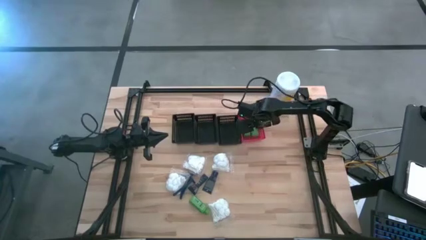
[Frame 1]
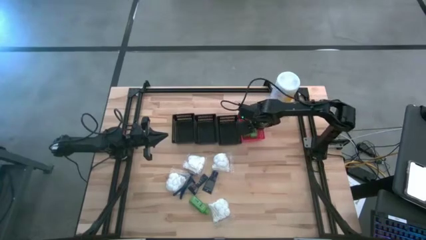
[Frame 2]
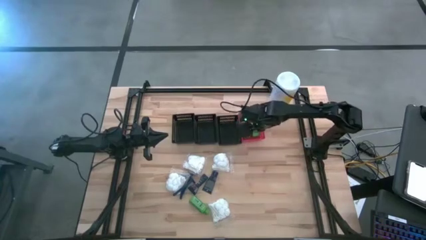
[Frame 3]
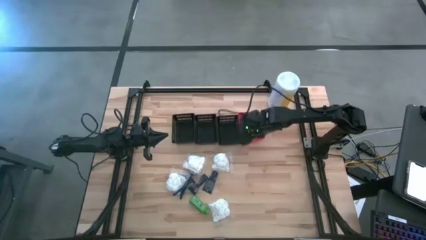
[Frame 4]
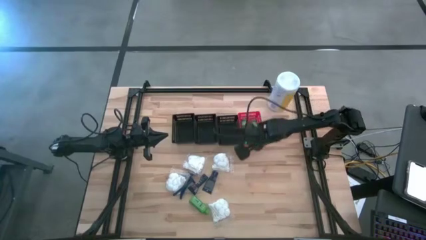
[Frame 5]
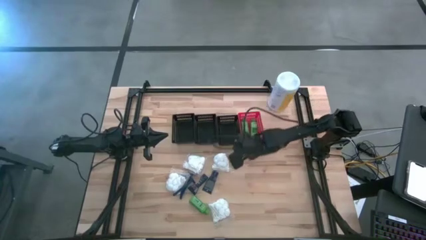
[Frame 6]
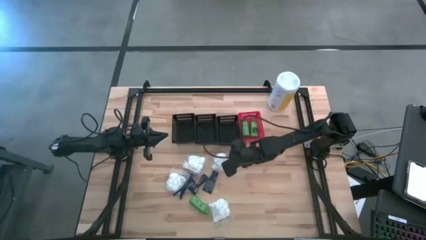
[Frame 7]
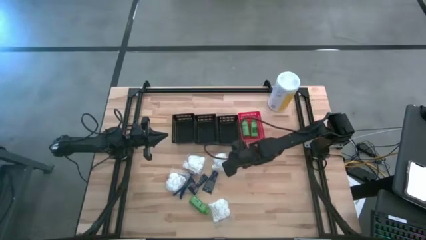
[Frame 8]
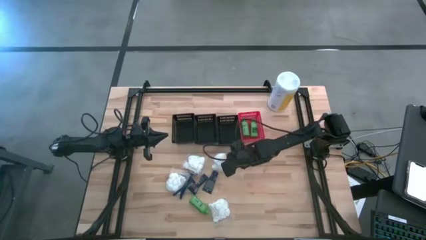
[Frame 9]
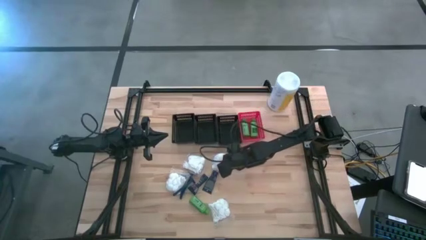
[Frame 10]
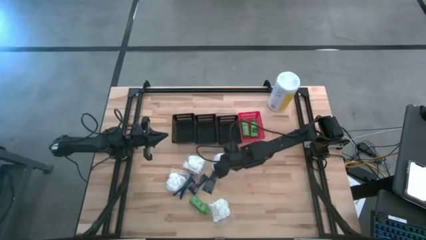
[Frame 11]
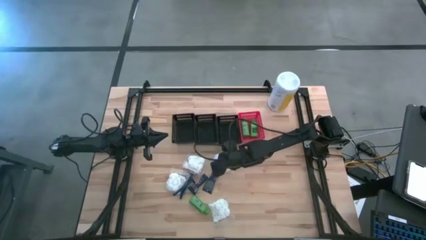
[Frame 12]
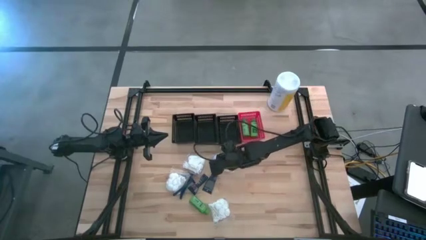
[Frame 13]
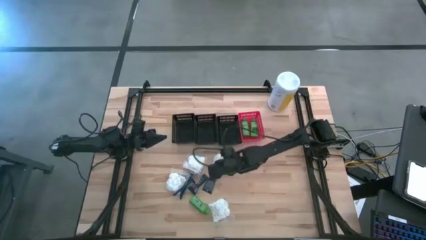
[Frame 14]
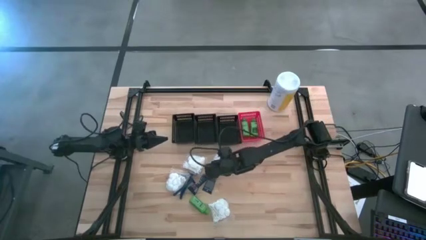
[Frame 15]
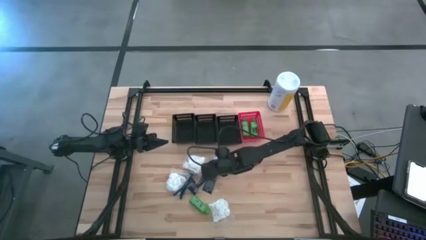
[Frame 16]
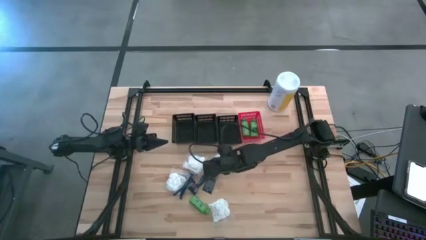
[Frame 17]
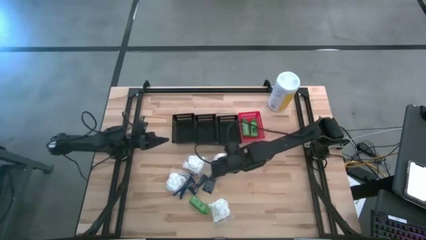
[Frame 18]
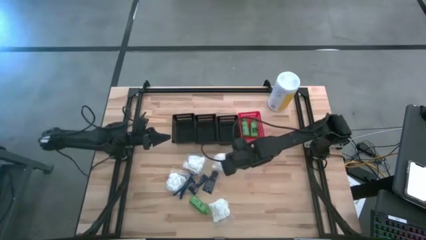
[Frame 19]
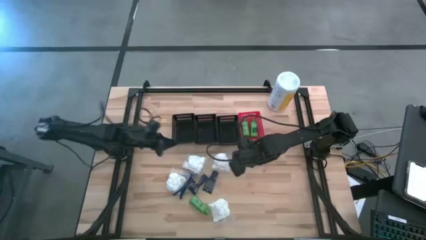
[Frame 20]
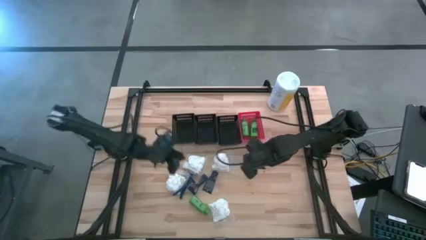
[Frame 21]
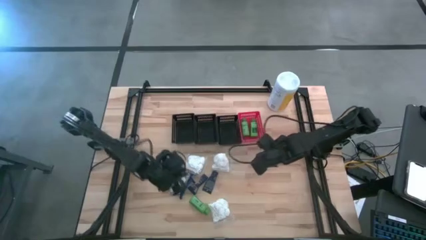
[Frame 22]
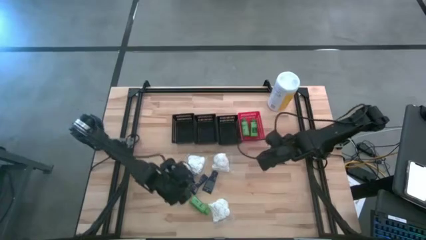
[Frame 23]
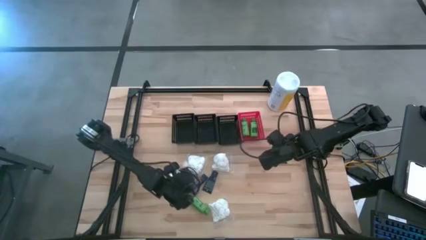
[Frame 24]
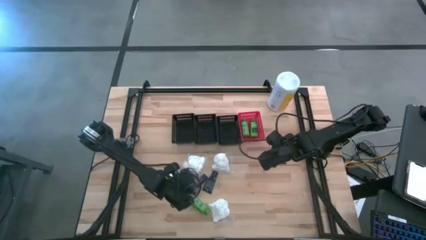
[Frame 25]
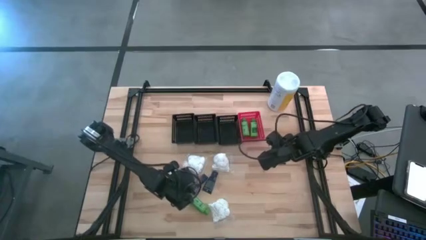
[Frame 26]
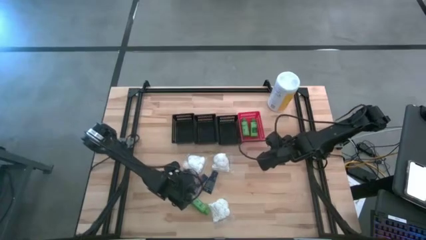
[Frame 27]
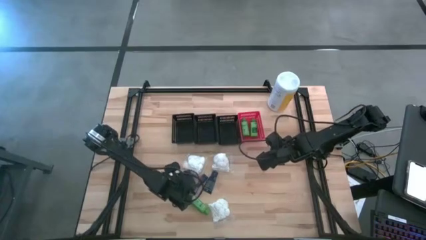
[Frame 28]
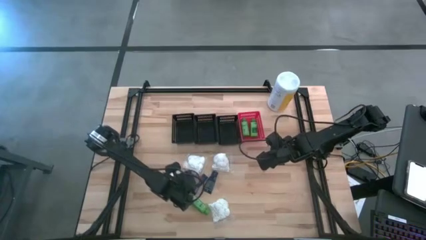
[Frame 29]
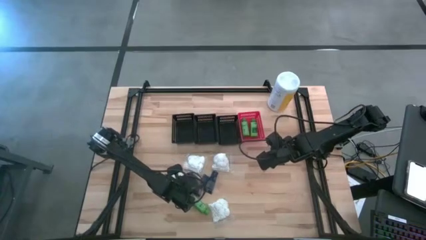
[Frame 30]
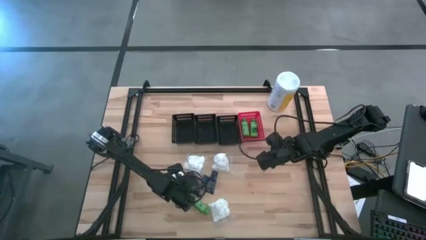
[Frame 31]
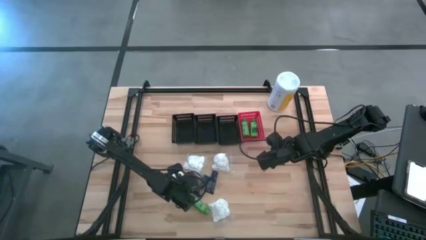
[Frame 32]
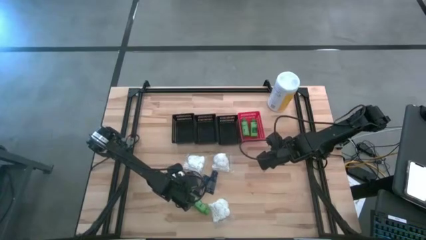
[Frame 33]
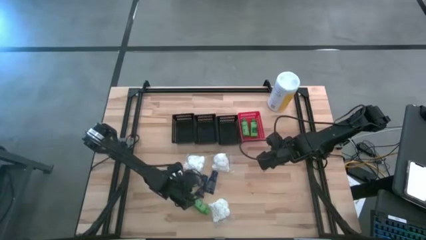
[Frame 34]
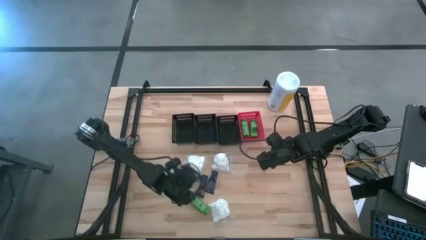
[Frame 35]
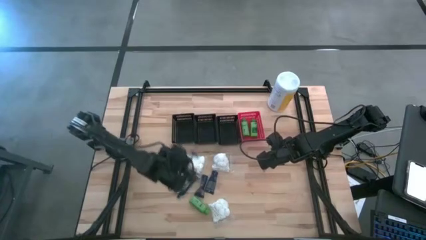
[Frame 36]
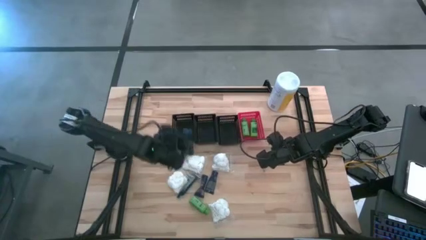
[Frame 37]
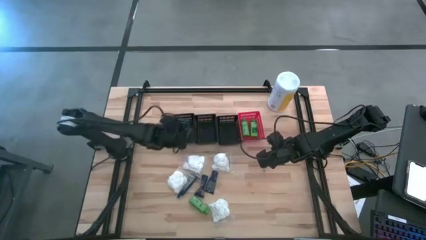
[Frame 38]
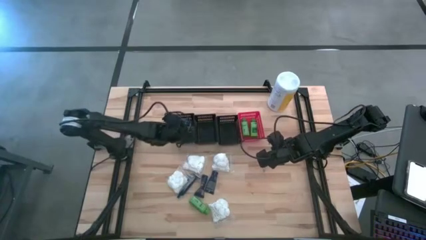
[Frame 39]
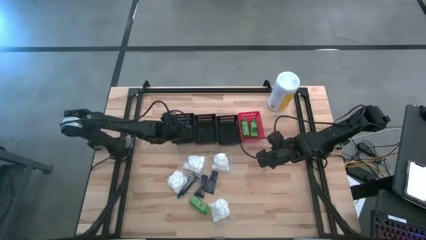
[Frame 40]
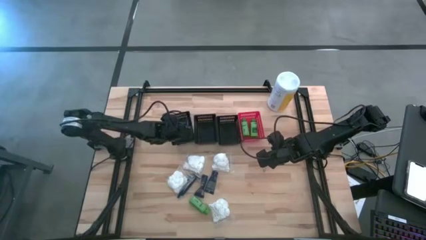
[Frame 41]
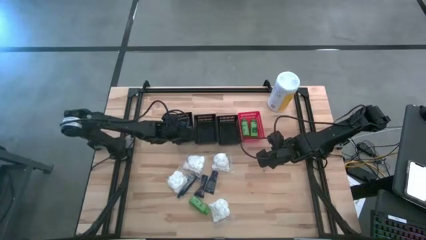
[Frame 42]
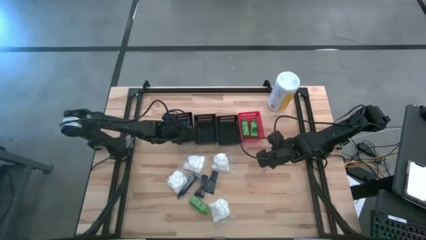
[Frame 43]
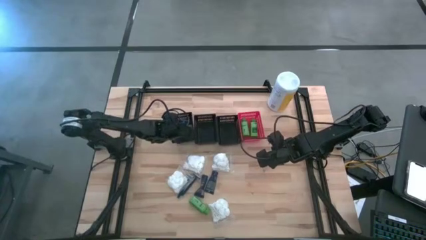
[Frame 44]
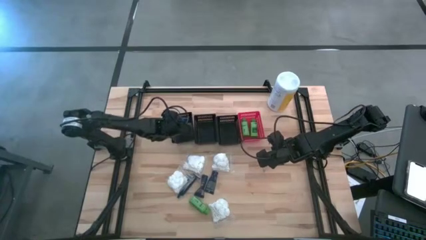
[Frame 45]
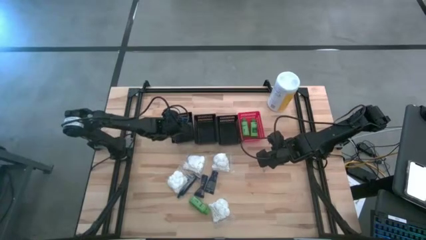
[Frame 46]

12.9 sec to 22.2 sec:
Task: Pick & Place Travel size toiletries
Put the blue razor into the left black bin

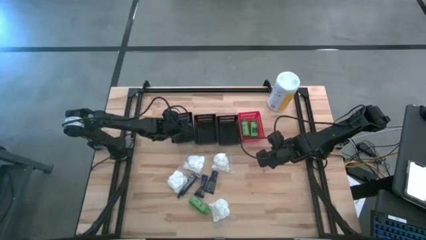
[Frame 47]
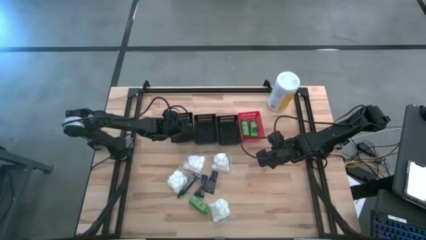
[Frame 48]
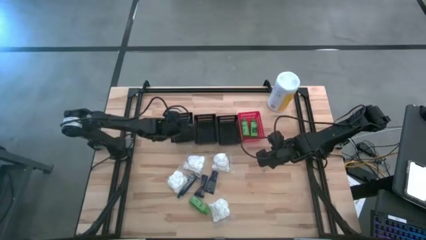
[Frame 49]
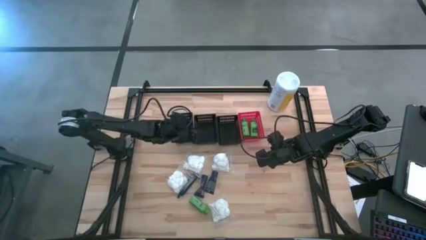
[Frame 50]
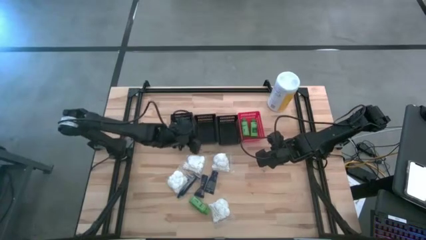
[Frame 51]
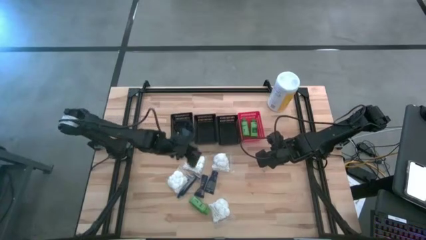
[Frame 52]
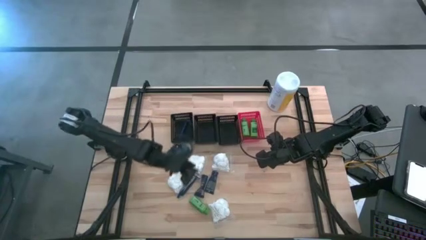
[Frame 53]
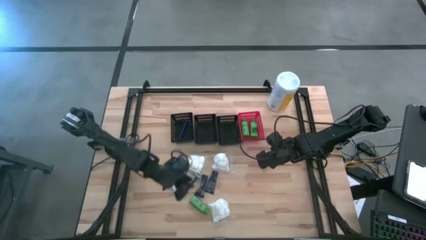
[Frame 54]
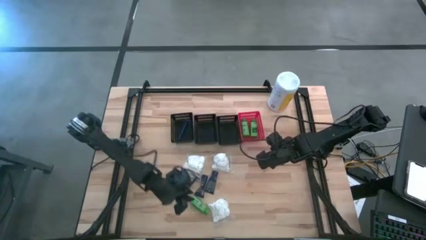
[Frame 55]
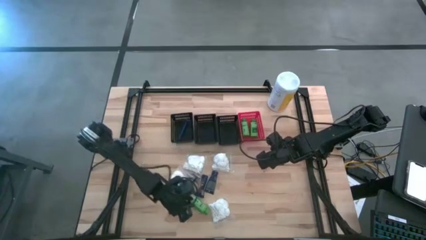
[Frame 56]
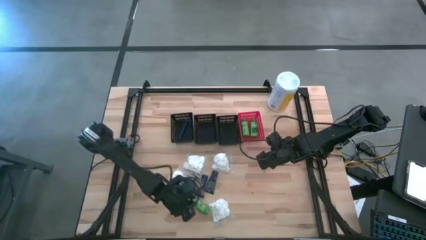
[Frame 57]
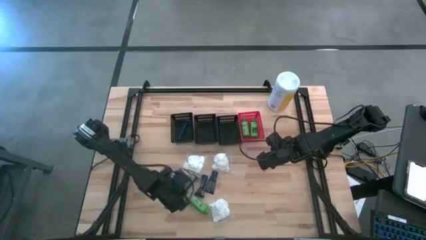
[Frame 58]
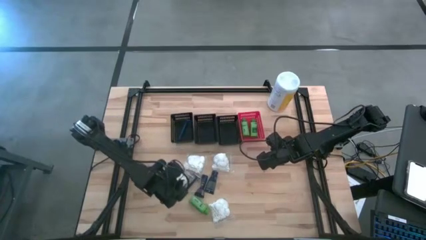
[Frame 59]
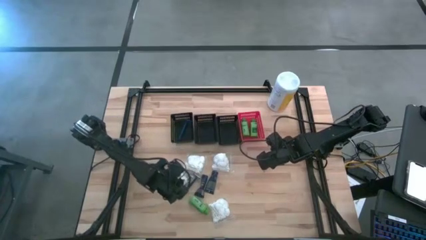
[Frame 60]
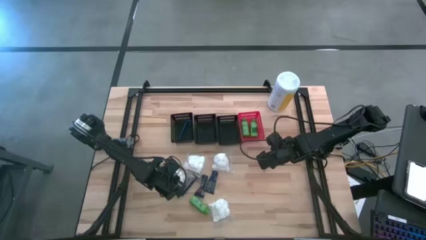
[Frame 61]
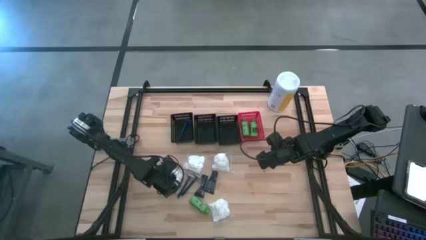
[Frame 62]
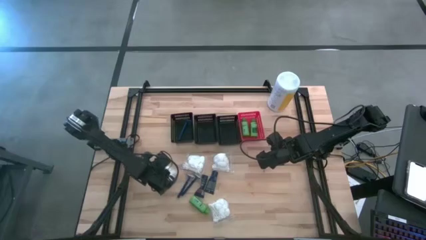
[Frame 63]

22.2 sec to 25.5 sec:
Adjust the white cotton pack

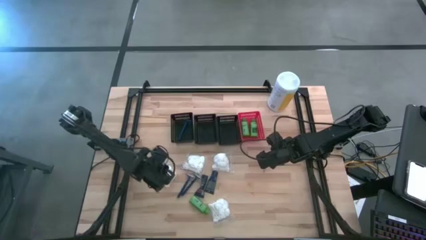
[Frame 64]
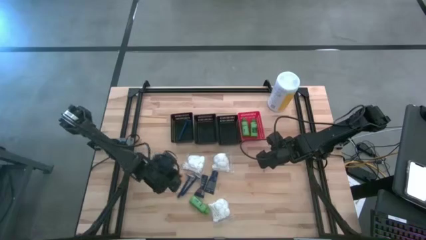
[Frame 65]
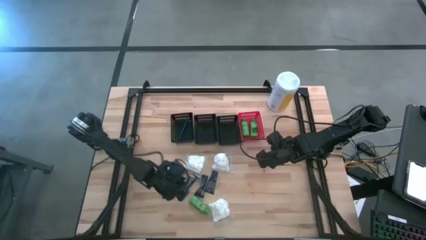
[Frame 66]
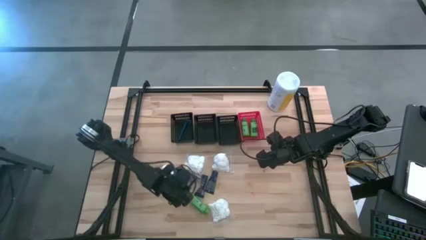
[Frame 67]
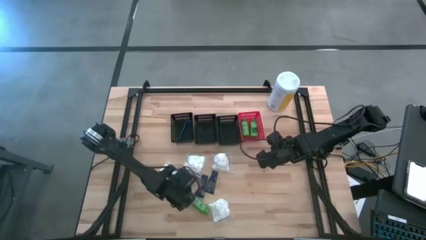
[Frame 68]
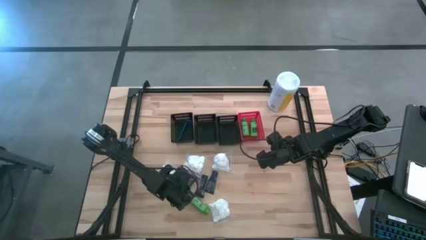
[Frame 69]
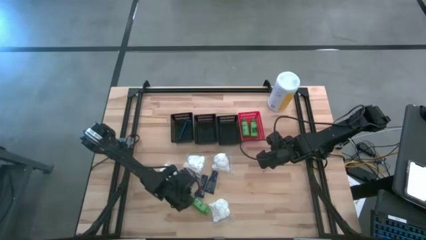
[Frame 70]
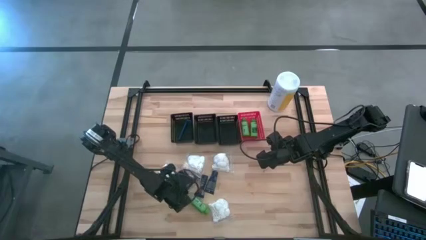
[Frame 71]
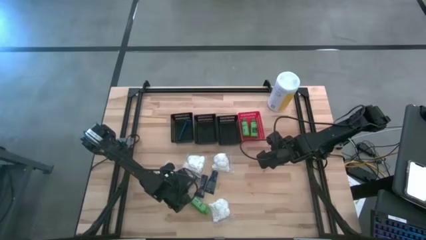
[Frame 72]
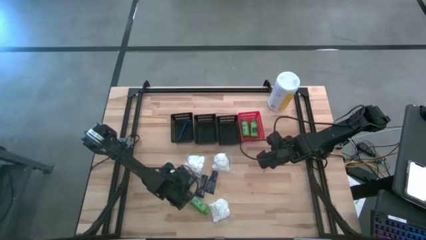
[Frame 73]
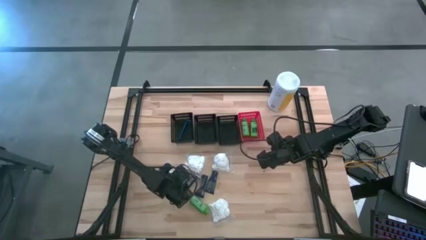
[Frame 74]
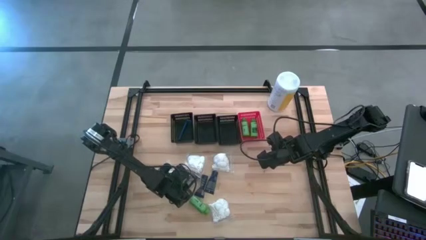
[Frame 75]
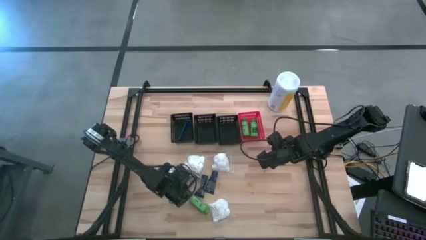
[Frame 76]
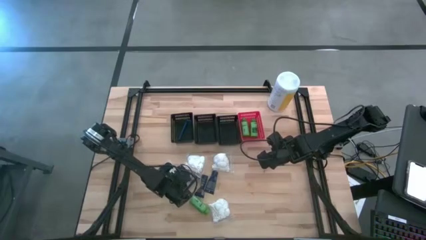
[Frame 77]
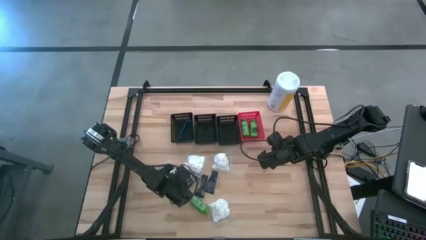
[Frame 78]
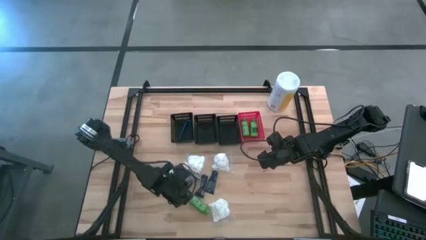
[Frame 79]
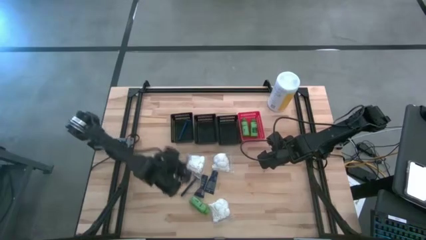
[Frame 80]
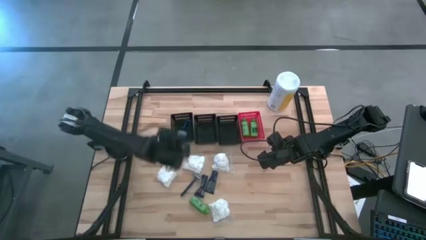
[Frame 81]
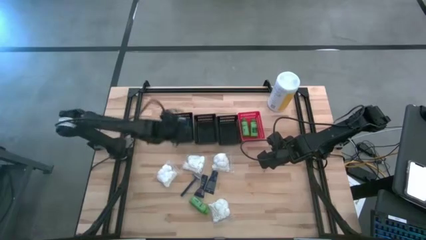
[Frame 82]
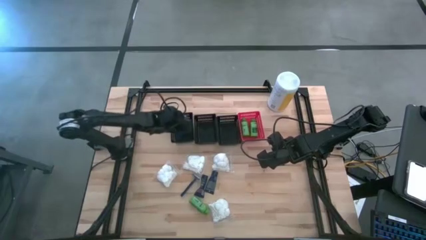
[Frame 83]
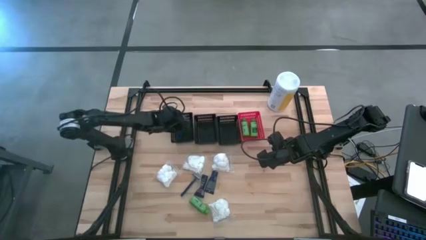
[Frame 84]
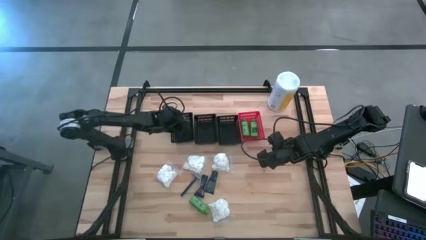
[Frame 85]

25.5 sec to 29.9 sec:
Put the blue razor into the left black bin
